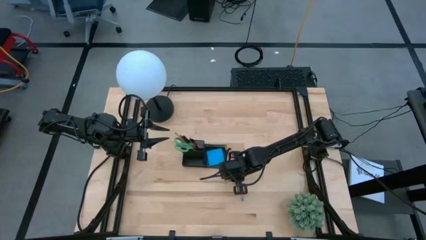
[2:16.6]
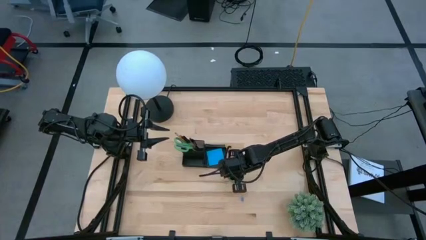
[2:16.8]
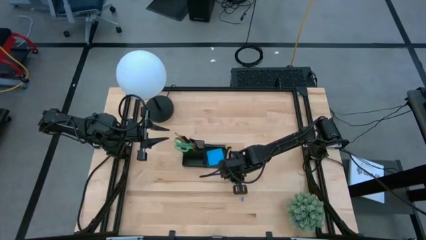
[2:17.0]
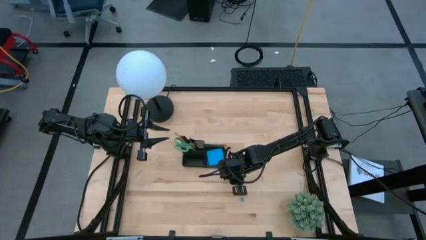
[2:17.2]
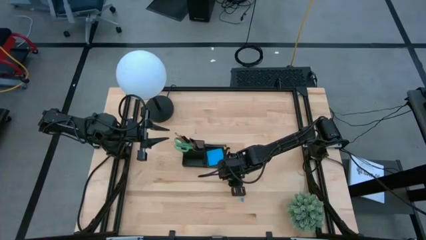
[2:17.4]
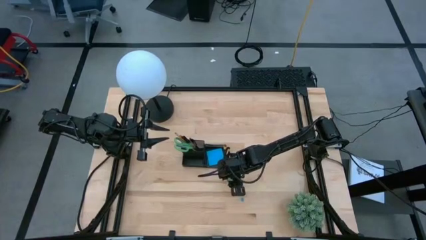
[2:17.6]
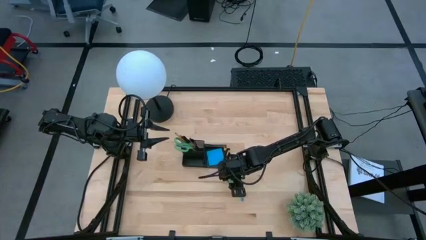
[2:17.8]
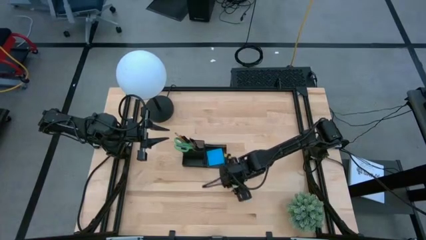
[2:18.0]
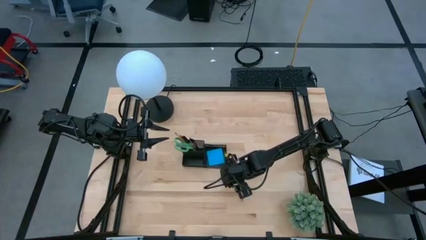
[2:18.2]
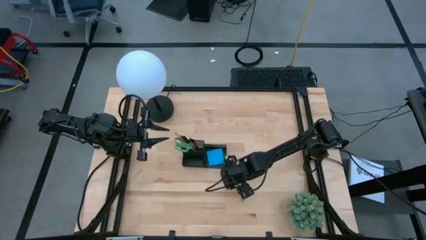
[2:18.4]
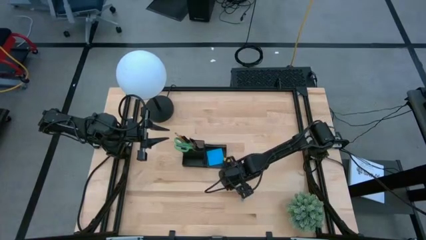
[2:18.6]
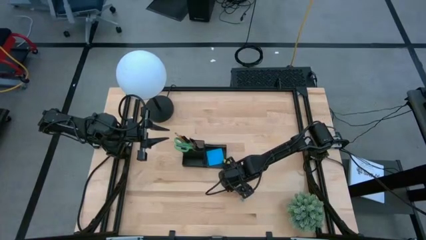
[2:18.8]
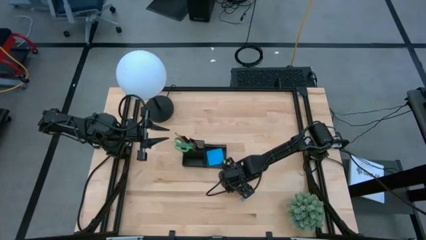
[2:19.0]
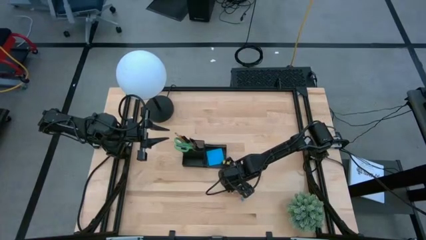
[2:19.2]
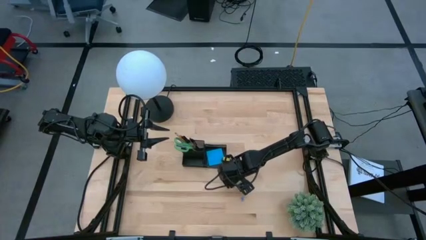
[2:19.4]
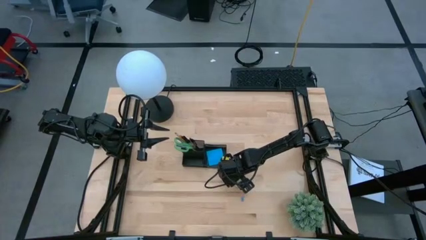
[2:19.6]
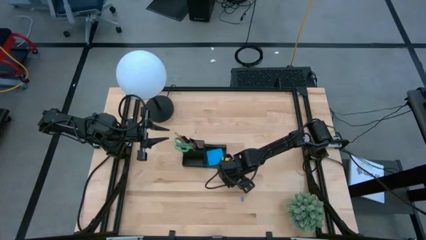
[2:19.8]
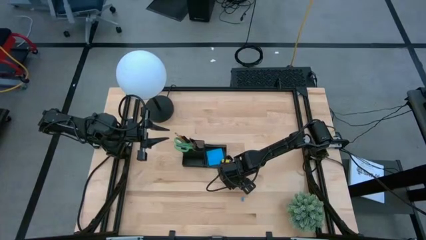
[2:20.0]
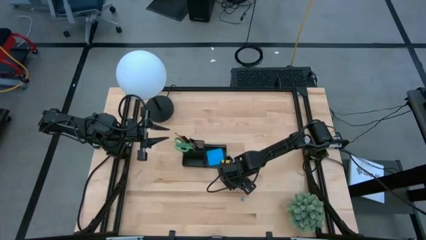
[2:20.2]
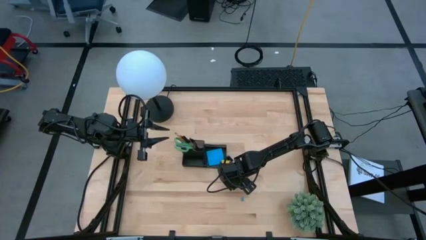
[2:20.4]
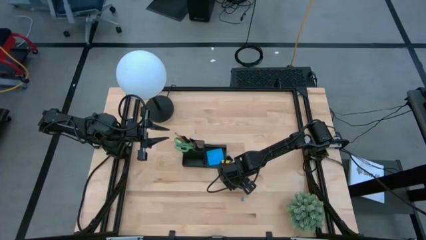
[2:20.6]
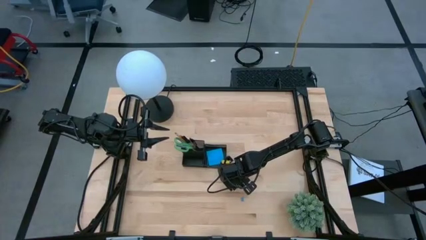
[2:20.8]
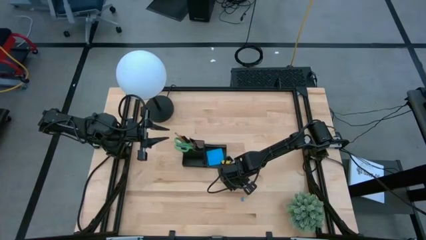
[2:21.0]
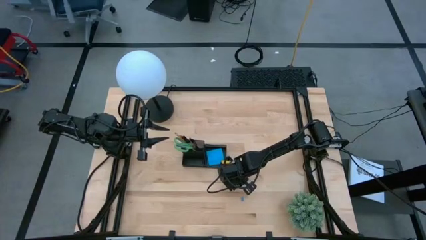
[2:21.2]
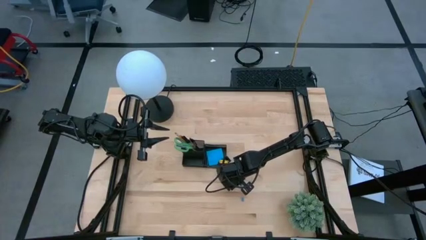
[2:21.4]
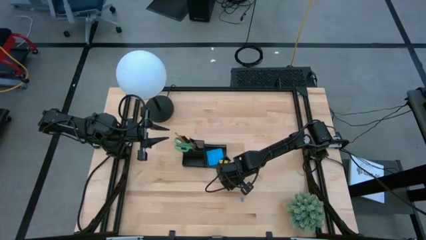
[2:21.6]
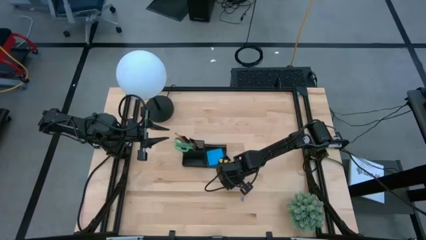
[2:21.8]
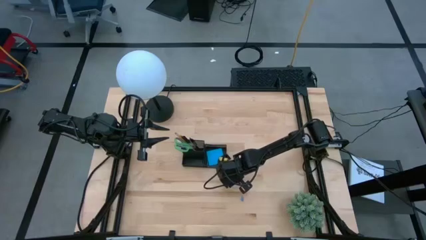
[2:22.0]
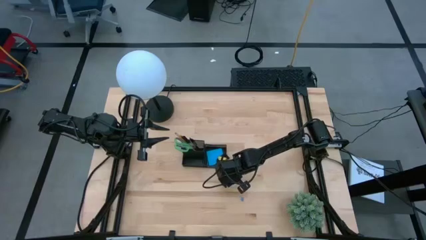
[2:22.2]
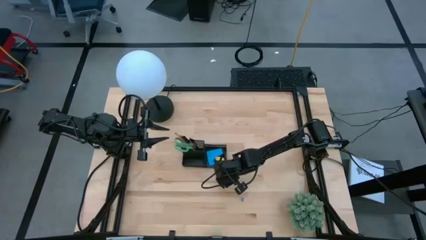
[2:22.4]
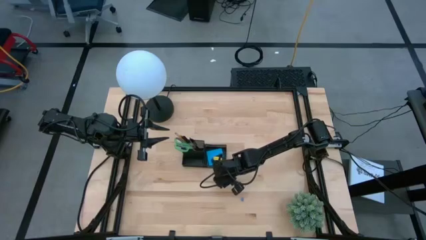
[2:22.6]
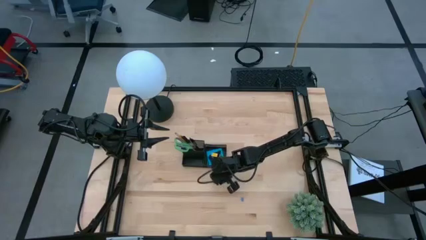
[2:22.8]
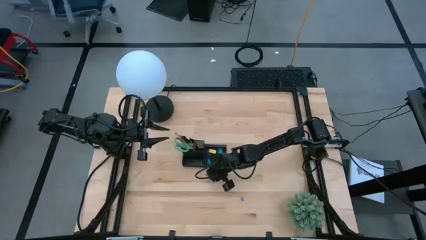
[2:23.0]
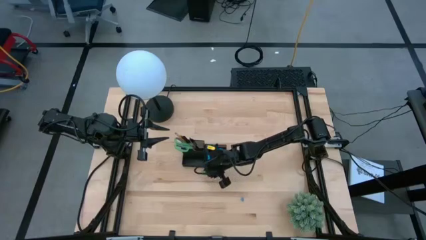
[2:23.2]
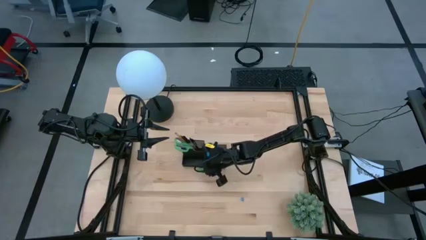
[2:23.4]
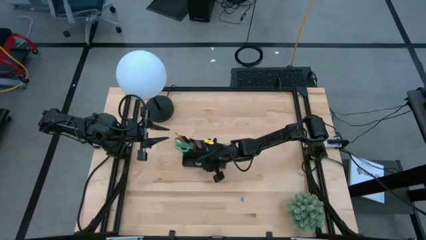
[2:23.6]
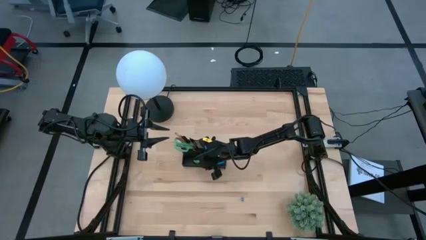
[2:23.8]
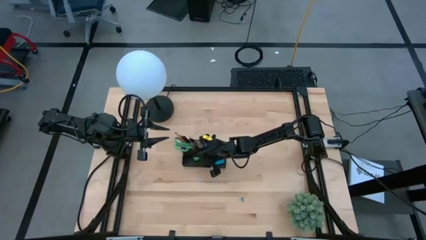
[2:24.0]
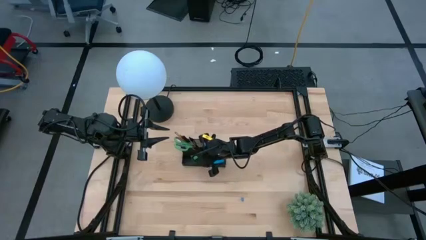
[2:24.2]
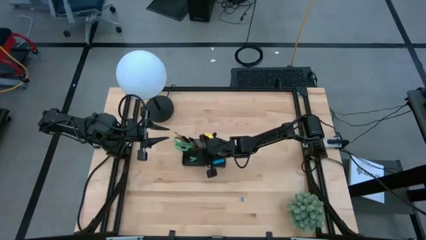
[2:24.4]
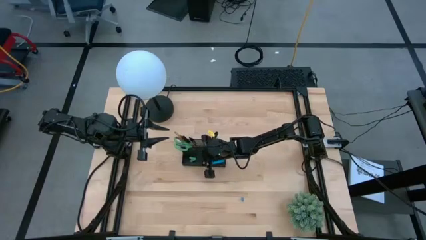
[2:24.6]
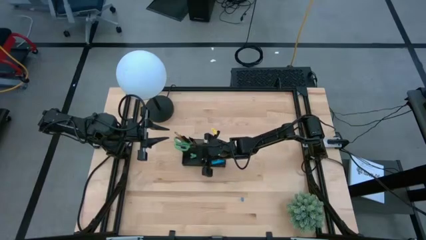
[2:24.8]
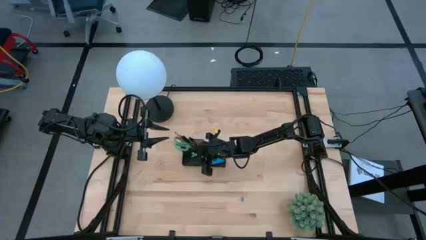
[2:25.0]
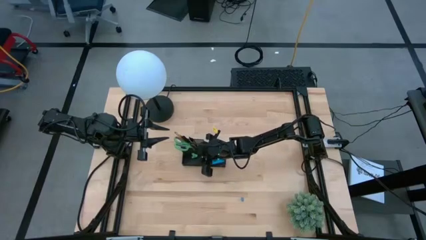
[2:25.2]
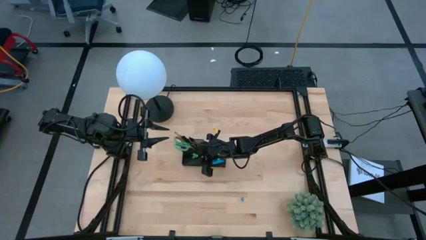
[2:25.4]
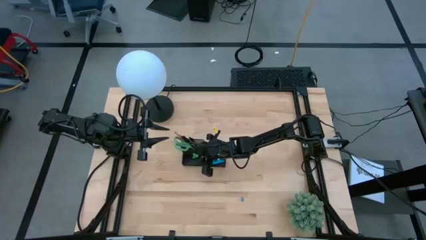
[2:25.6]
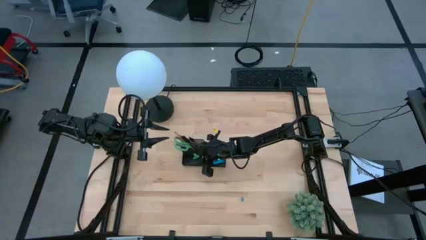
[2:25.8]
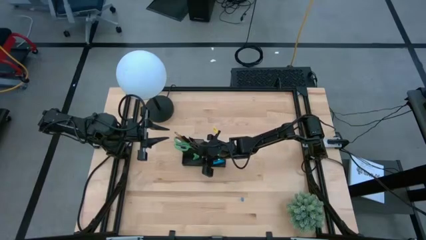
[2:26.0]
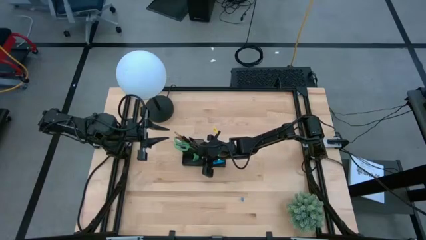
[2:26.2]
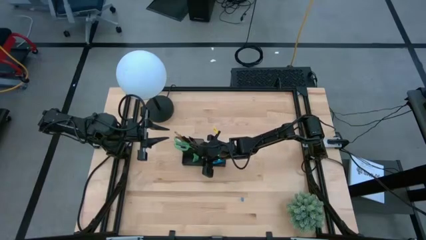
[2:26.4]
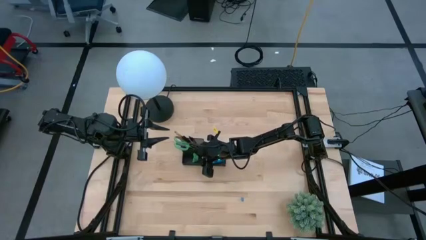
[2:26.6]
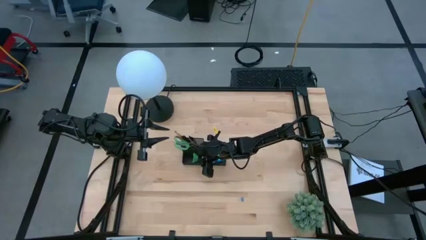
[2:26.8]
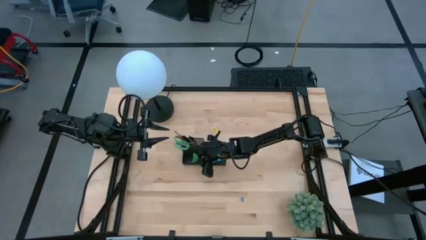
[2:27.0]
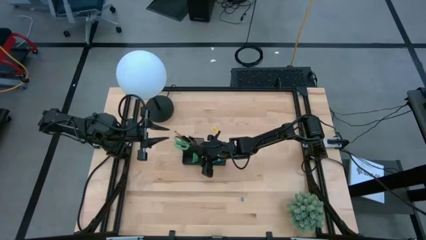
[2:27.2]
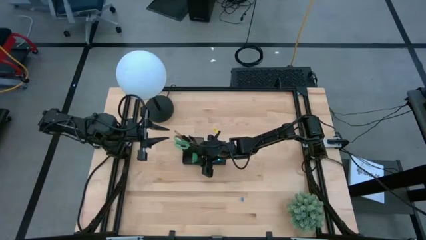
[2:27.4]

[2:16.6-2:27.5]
Task: Pick and place office supplies into organizer
Put the green eraser into the black desk organizer
